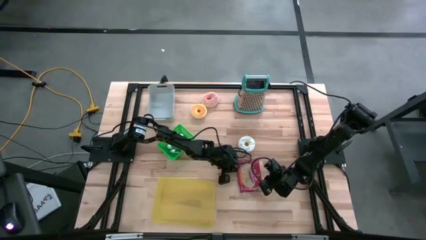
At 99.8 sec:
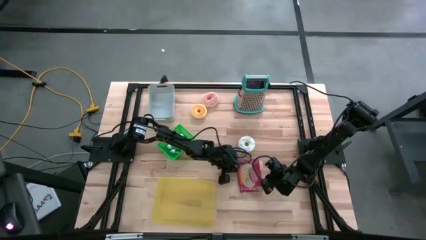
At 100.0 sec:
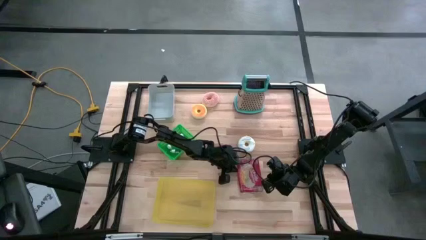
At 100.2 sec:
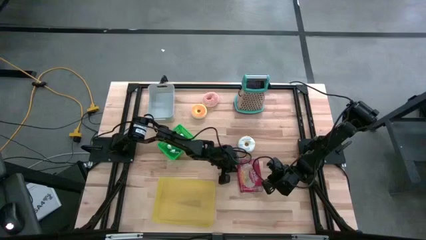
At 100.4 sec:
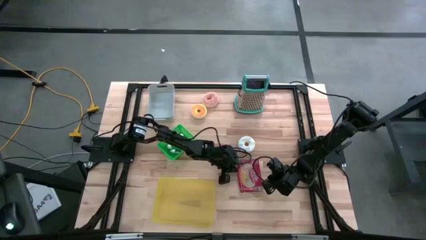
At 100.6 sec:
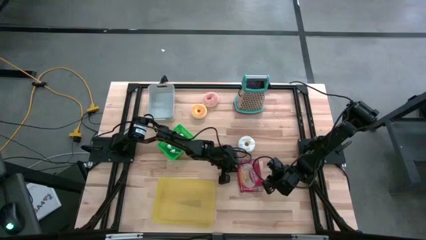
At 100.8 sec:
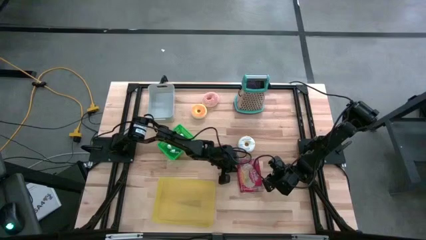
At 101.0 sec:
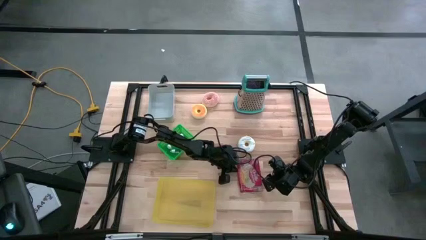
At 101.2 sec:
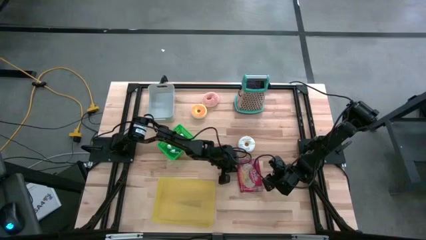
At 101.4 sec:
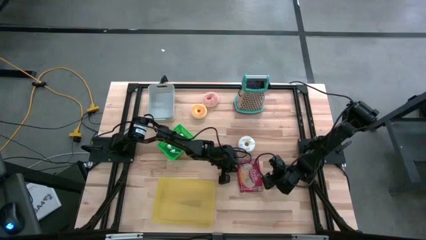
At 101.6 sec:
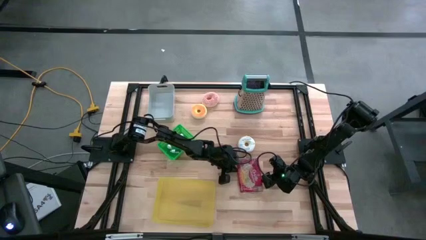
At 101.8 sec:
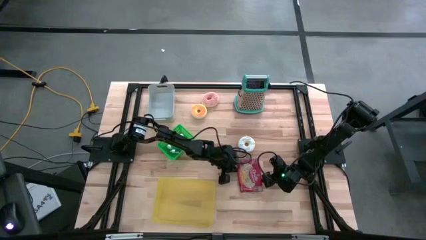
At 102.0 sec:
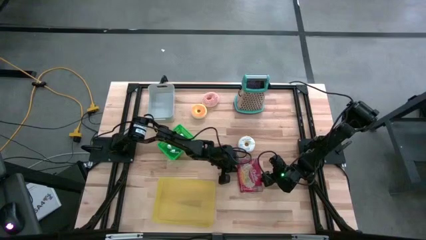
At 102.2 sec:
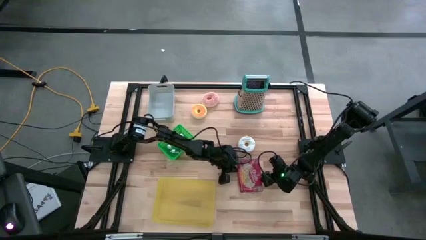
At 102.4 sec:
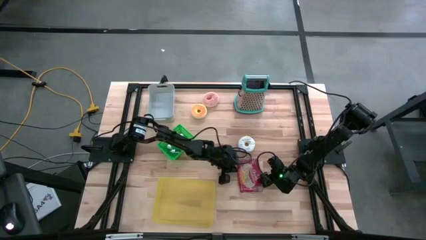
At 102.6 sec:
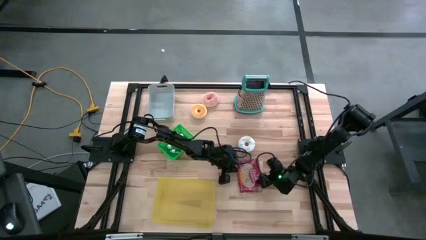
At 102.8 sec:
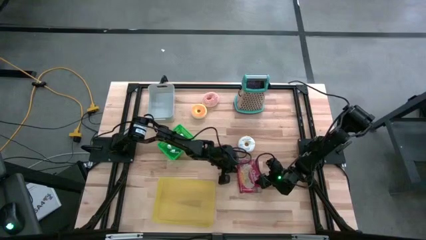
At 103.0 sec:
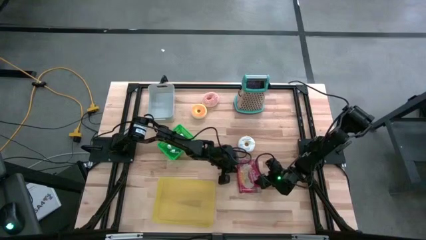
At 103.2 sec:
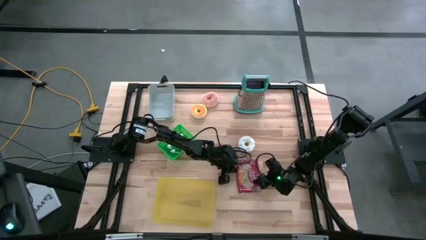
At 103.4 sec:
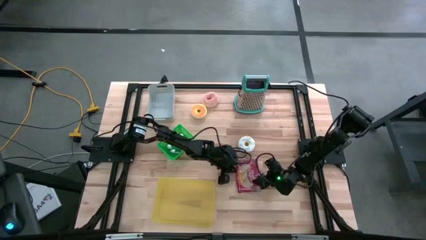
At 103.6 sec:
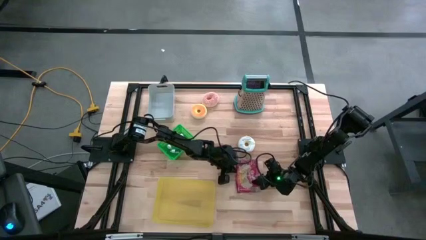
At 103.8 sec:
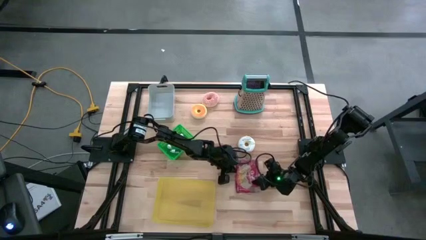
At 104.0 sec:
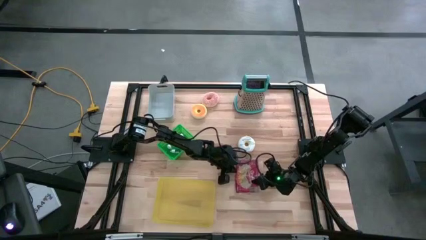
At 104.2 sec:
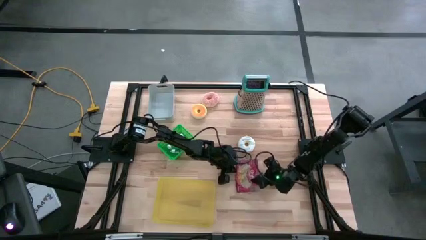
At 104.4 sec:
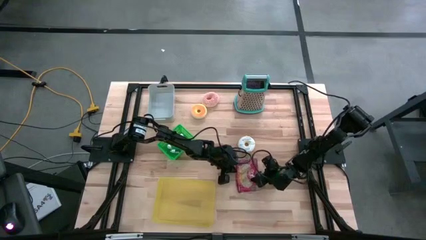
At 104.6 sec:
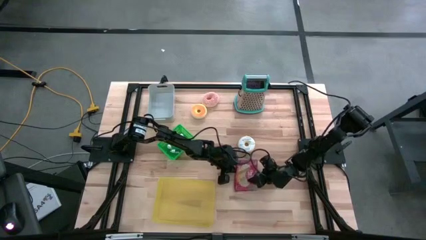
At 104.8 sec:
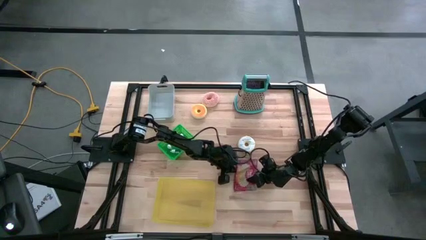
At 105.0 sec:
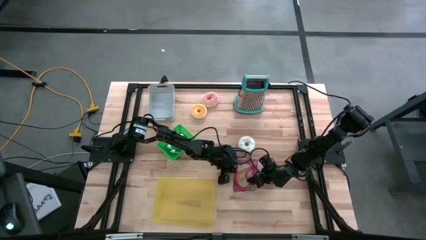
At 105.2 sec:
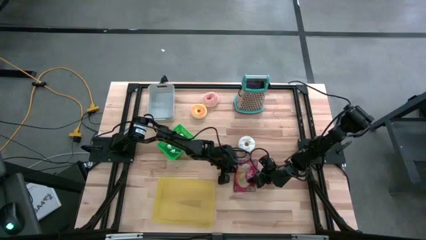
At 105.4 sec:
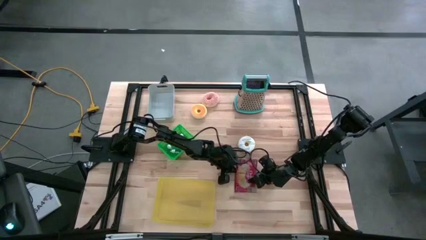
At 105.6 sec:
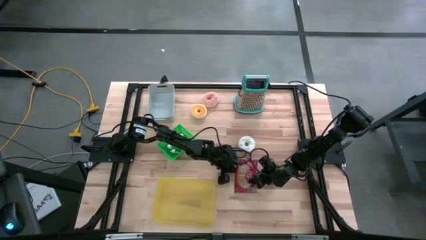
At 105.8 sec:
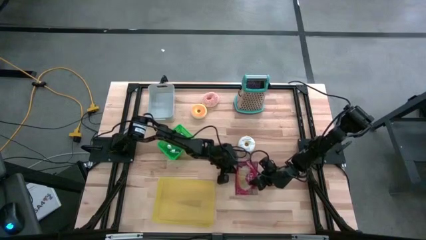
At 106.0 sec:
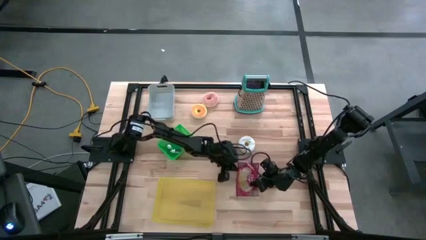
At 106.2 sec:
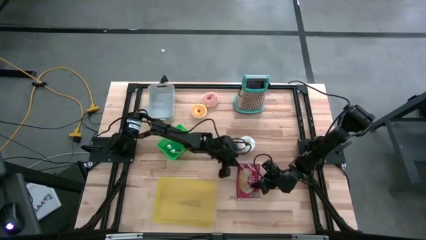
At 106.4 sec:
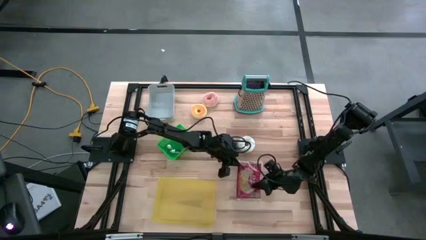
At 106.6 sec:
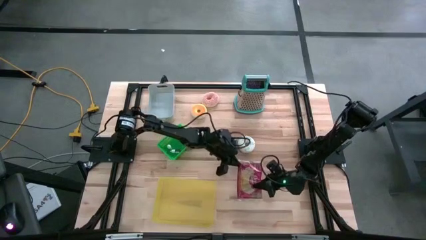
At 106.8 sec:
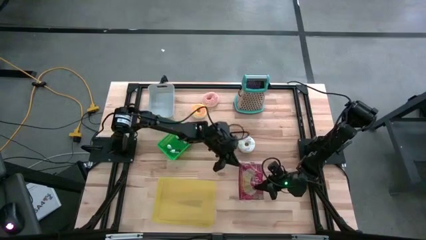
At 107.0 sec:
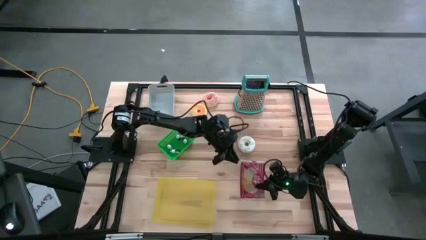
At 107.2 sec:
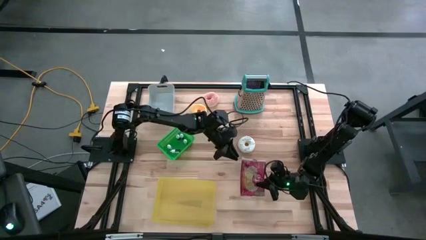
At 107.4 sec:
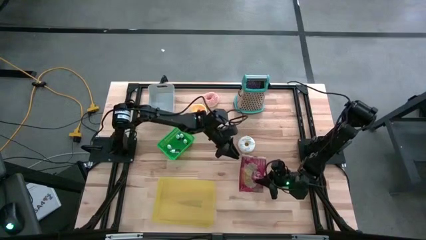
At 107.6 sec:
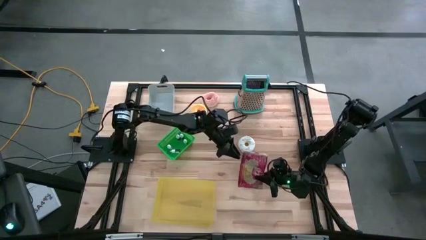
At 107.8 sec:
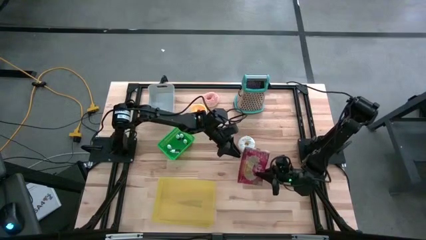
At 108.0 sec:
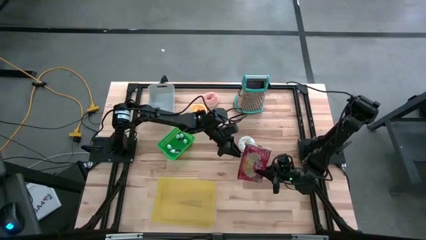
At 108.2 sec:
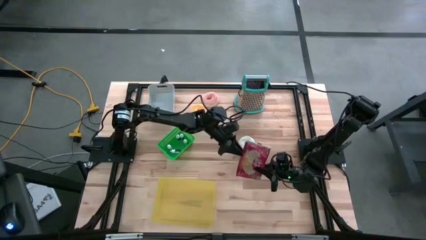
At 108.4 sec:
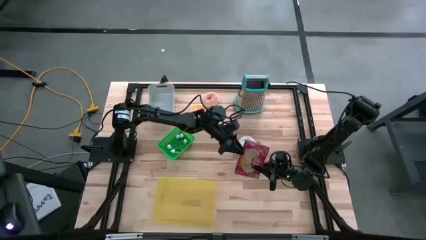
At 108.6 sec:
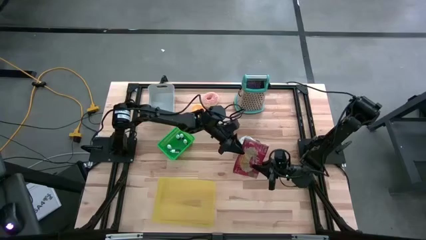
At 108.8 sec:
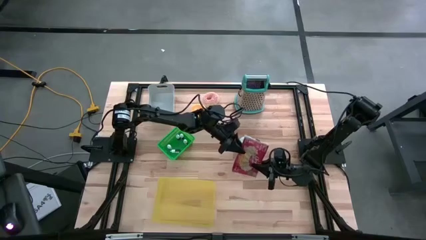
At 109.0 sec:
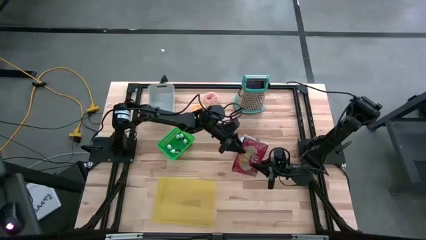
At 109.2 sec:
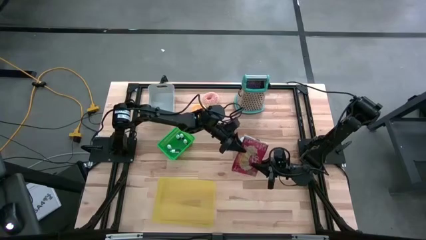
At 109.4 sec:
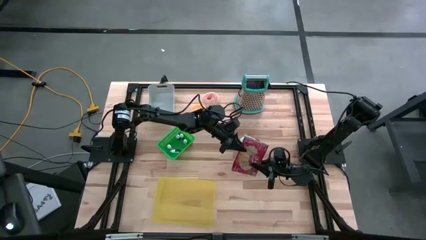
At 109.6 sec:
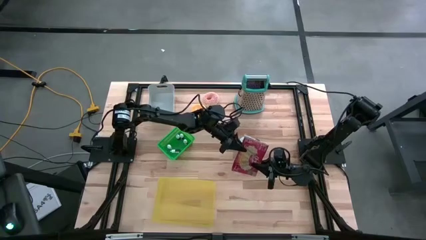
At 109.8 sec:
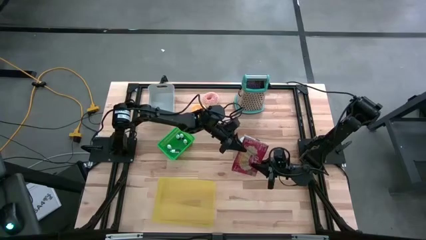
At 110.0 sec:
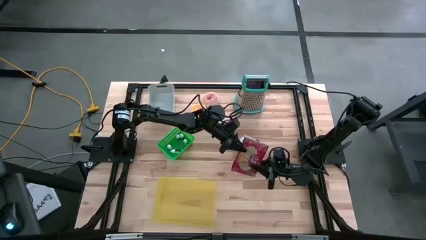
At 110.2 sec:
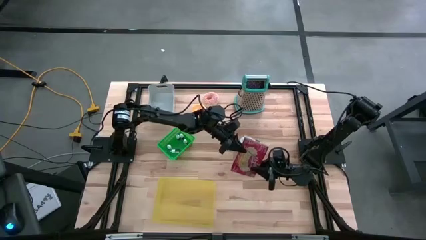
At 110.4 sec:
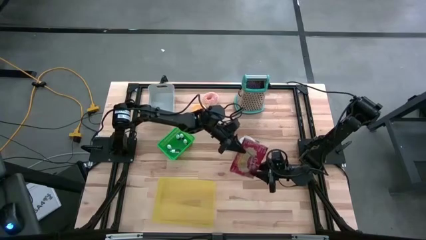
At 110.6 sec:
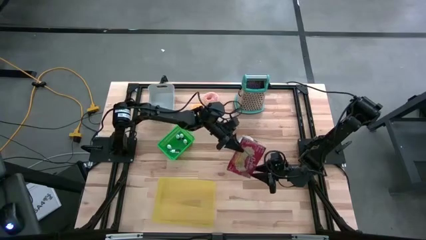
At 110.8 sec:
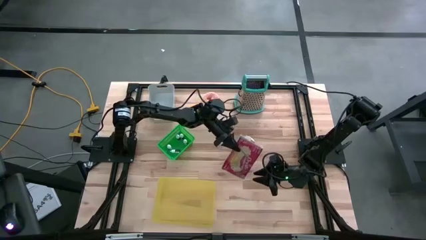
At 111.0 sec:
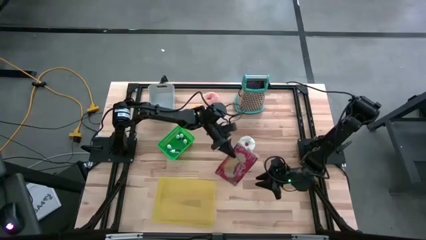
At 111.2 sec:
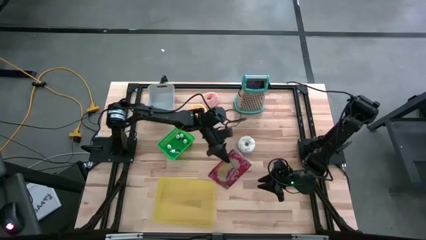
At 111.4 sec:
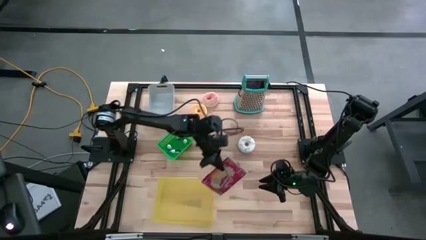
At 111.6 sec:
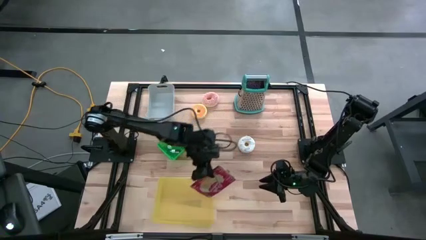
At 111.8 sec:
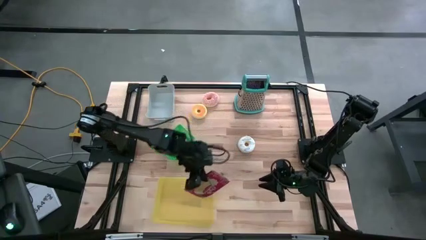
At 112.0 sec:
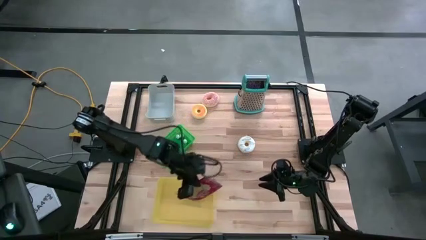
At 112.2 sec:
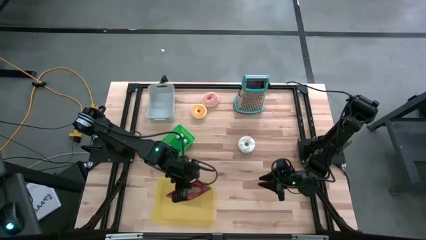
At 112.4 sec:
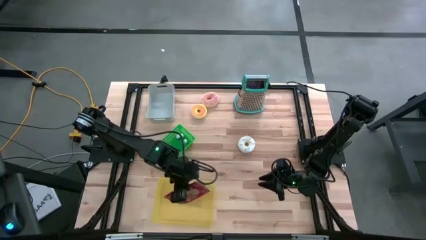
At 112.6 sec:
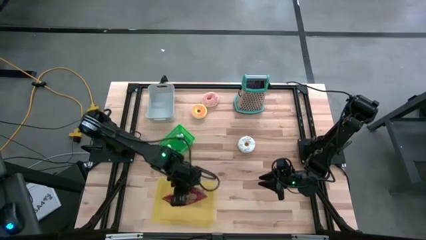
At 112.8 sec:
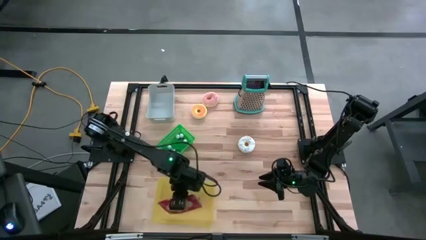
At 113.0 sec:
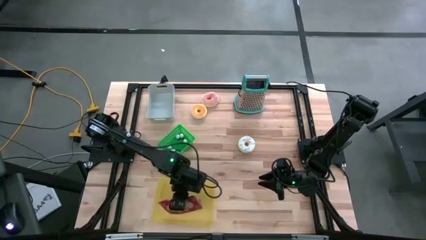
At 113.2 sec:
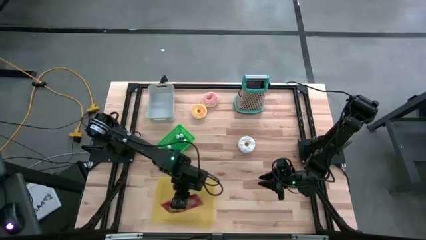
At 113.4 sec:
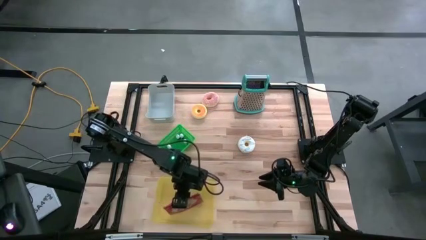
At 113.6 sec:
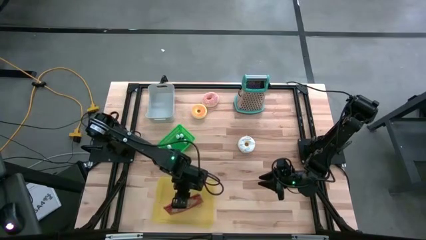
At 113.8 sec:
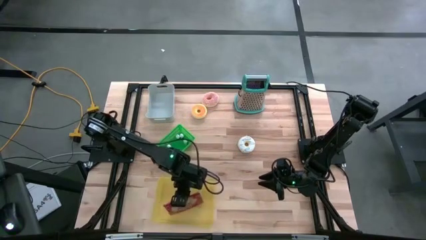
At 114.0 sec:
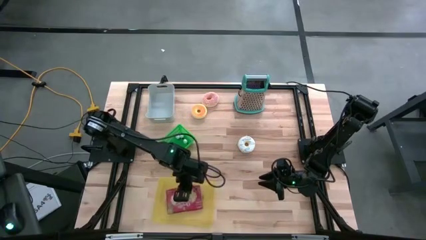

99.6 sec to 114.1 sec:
Put the red bag into the yellow bin
